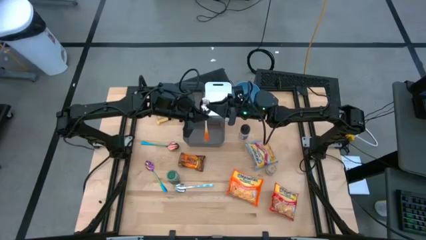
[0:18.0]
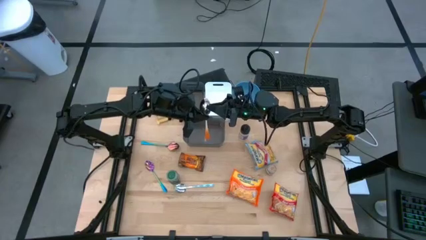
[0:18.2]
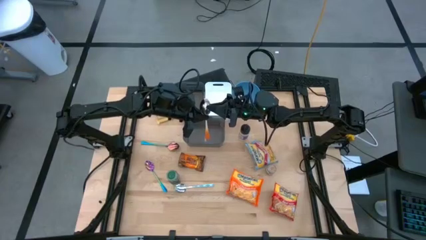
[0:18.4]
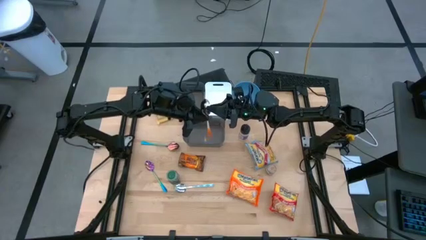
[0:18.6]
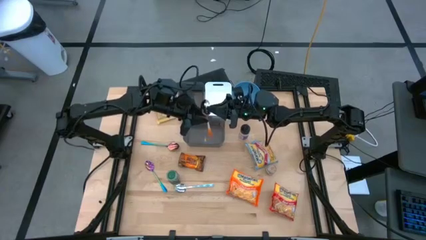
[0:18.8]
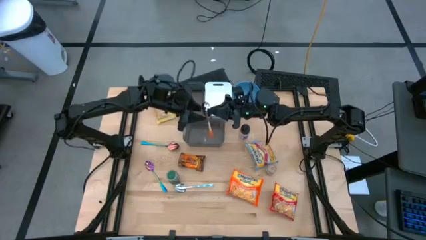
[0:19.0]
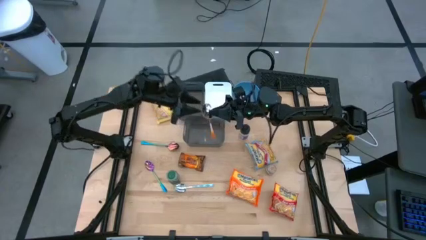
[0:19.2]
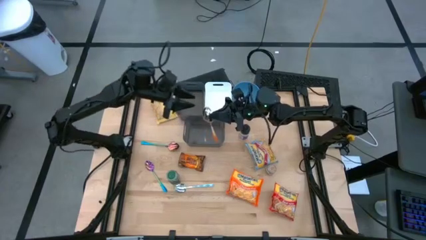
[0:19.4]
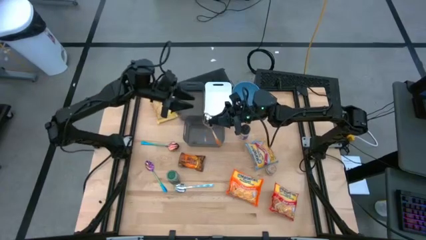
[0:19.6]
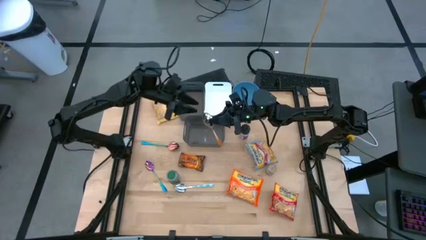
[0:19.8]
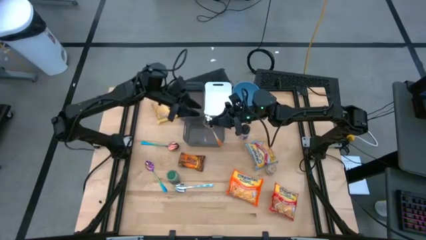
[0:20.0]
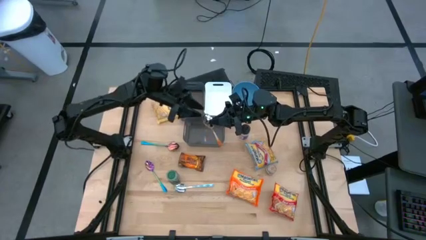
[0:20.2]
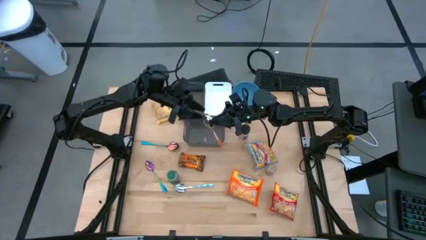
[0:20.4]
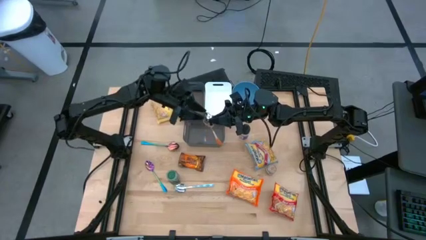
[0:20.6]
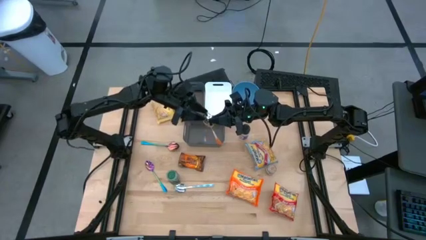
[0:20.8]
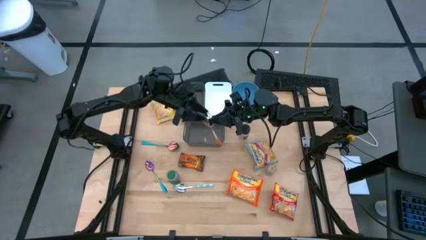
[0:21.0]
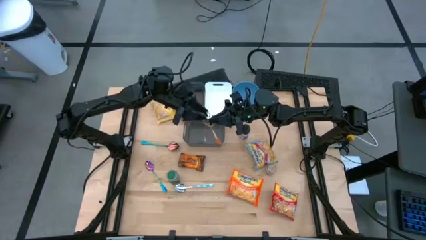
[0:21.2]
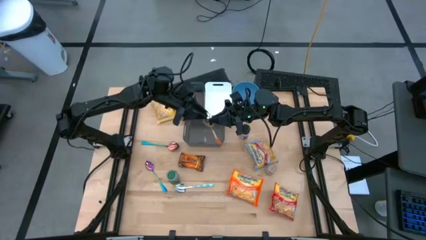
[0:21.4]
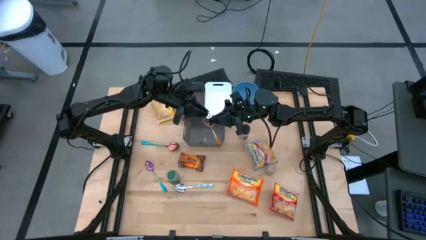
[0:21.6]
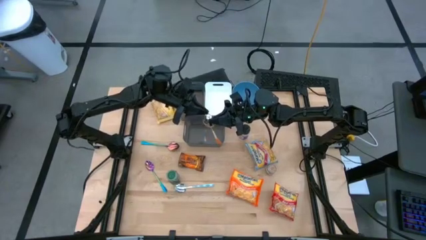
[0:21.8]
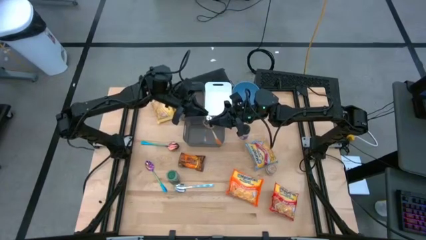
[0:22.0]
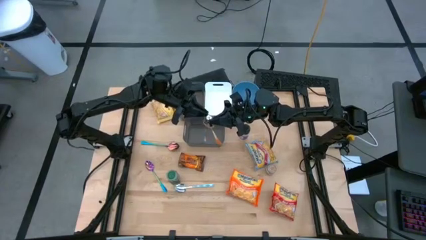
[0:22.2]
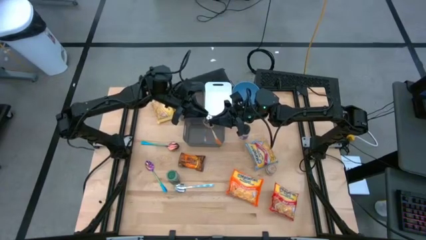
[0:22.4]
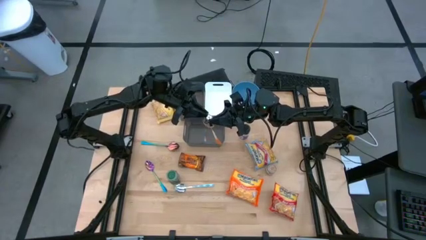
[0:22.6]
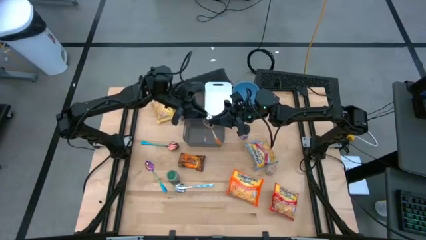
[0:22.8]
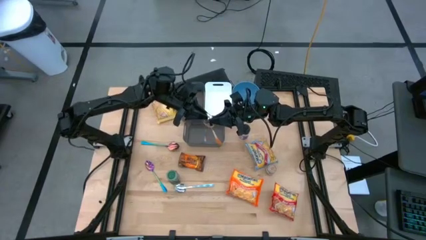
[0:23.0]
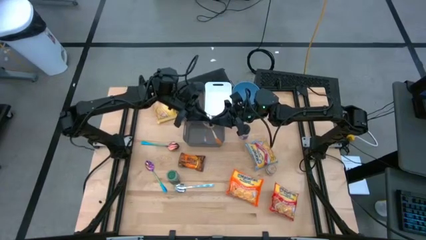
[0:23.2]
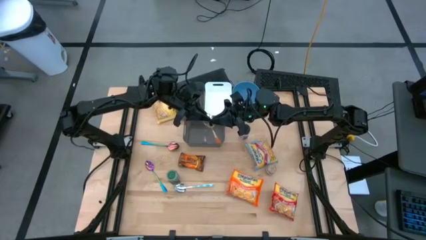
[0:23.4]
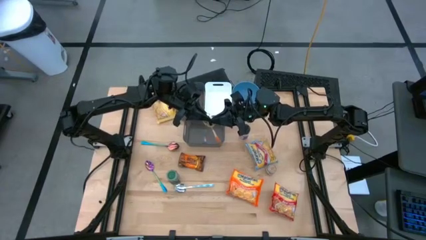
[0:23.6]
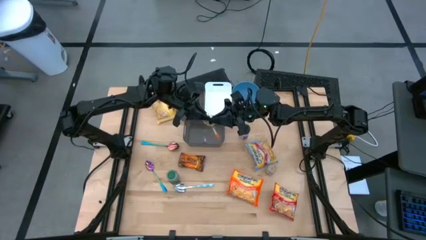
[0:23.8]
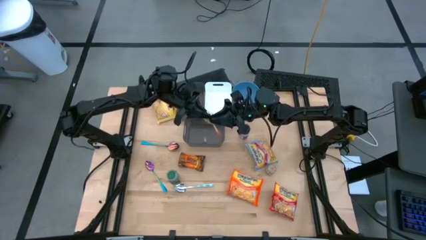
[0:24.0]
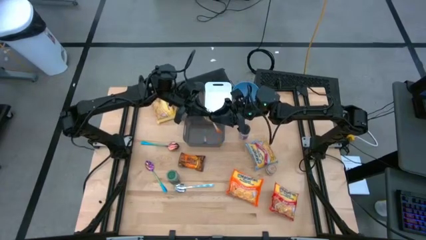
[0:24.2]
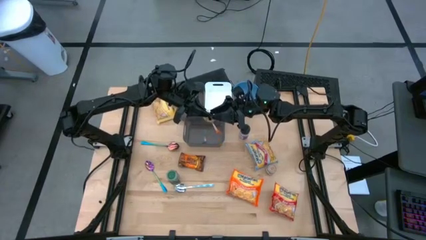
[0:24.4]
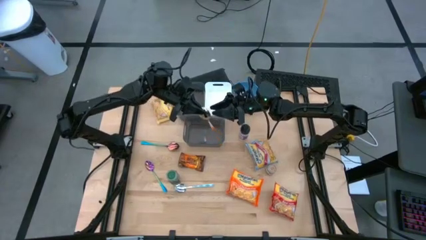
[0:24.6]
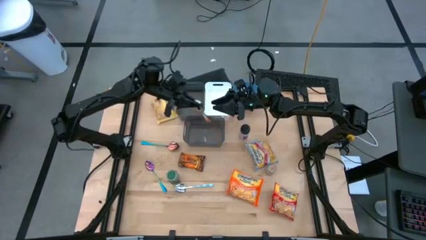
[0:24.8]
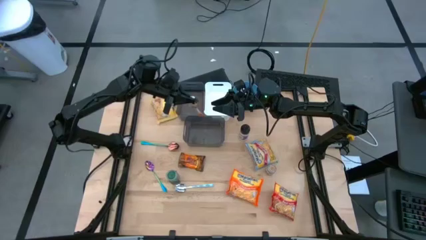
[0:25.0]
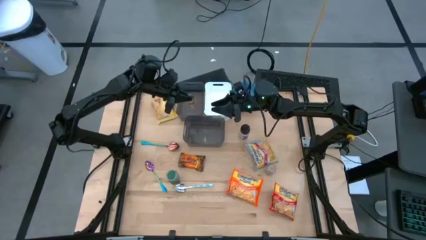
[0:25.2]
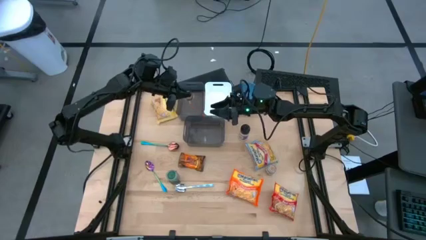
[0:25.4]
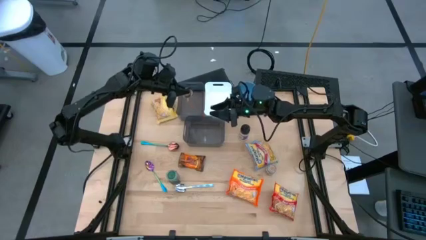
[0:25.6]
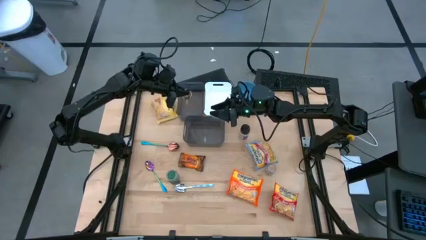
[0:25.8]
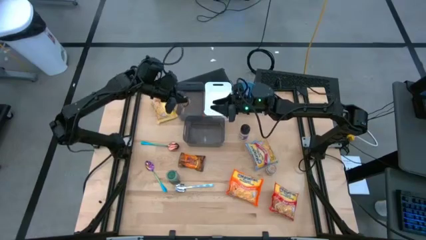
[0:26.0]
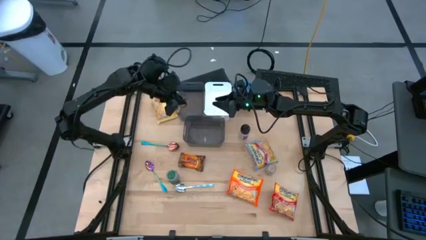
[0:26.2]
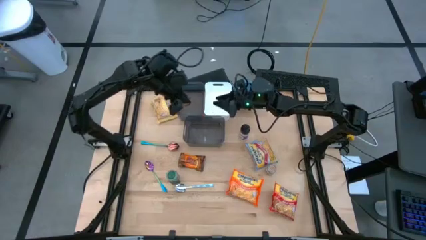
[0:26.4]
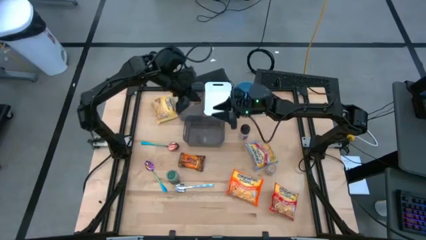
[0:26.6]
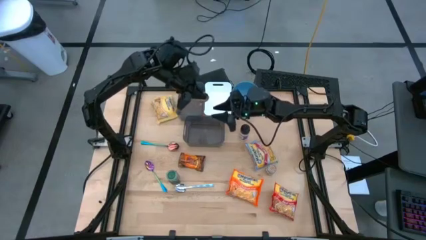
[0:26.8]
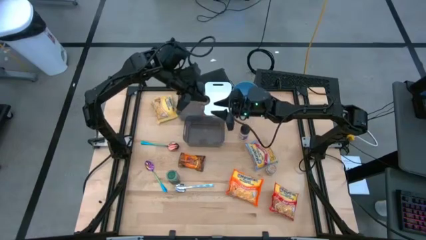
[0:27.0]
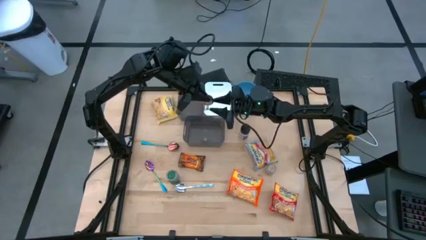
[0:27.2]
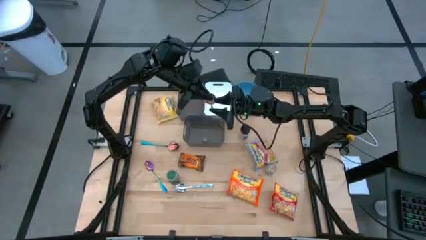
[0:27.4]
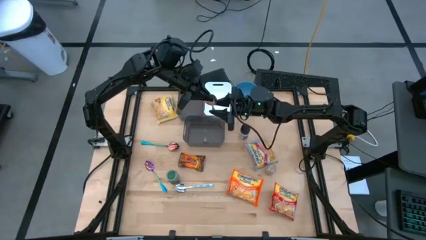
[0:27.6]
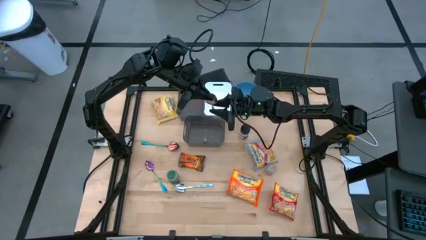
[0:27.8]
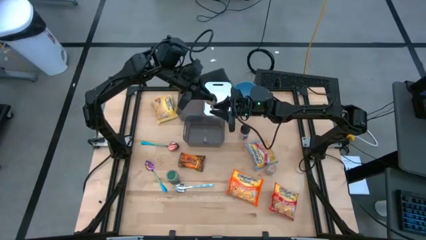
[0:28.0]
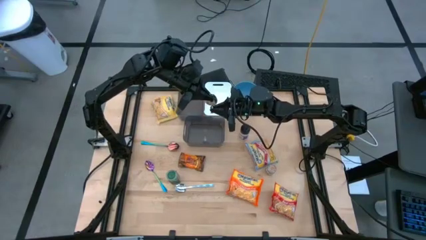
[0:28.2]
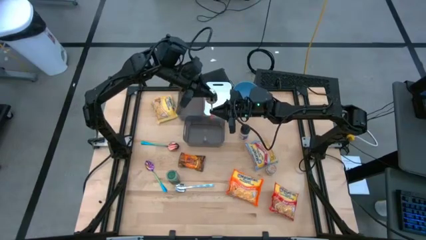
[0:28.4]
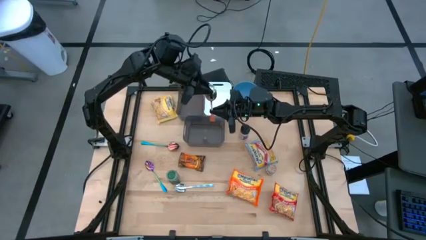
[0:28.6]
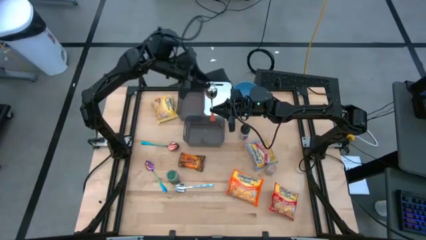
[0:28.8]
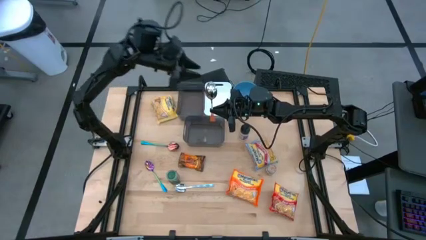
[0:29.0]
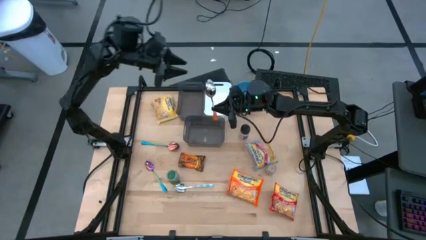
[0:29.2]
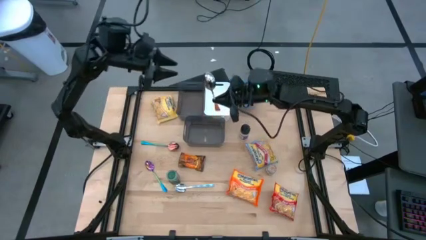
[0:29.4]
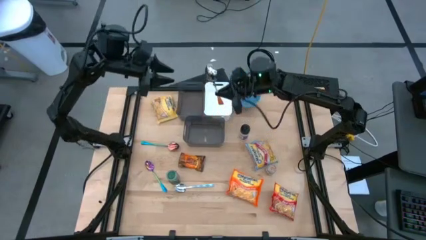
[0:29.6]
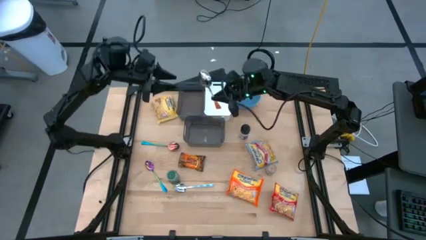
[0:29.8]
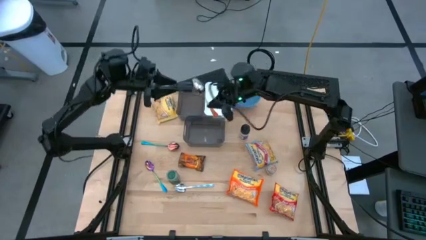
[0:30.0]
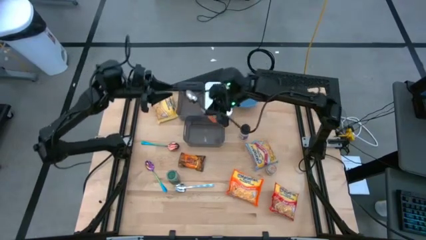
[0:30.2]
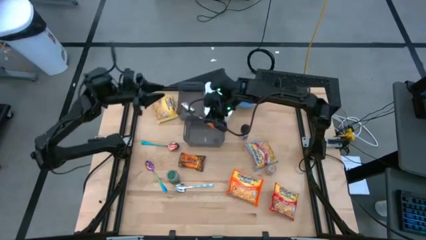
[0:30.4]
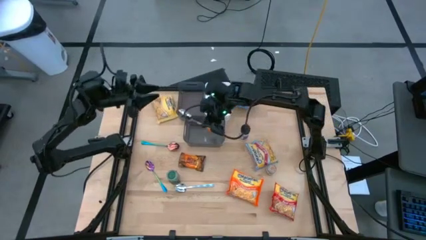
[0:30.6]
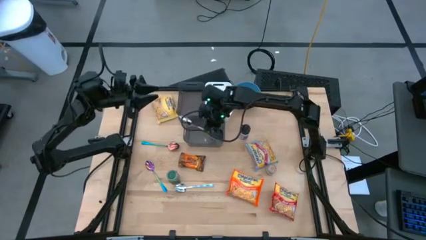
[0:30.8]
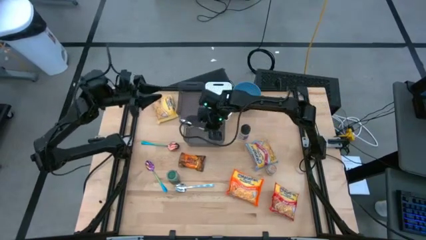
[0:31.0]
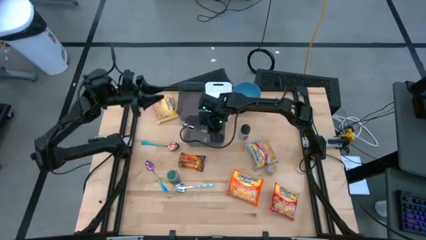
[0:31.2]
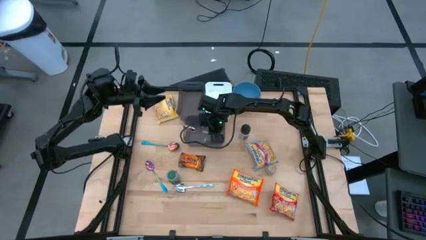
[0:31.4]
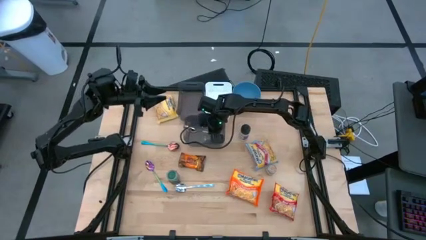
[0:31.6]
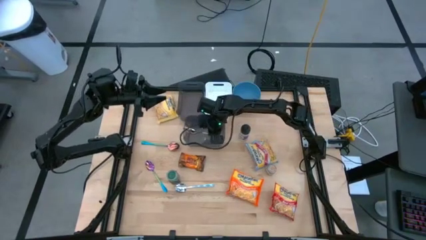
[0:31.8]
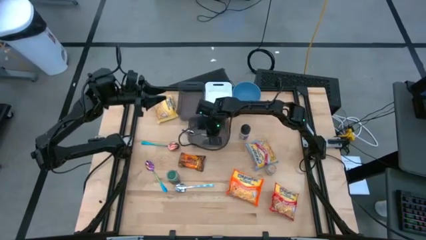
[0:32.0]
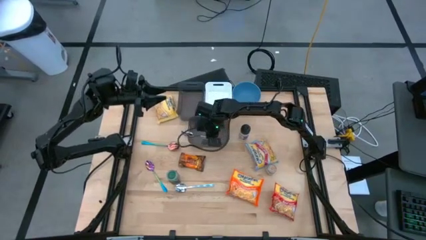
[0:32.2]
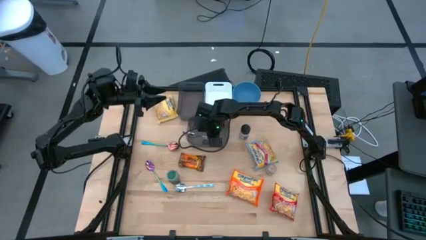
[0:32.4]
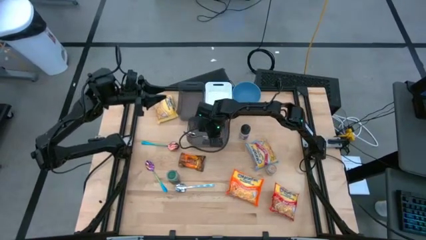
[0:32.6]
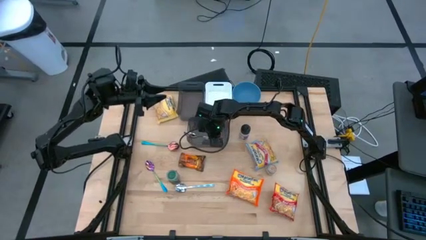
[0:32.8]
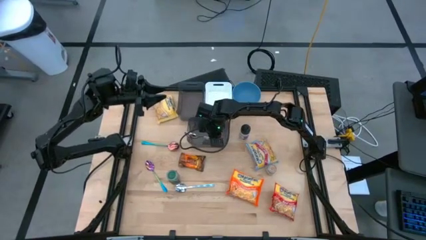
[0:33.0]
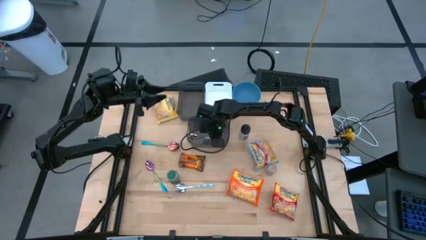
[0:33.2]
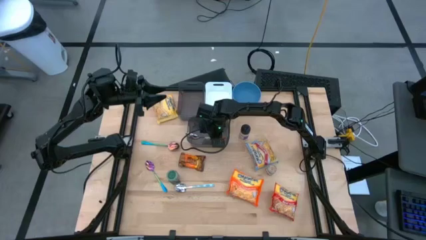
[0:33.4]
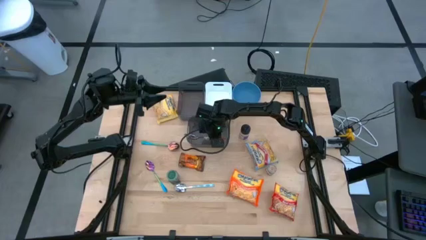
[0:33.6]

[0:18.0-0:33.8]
Task: Pick & Place Food Item
Put the orange spoon into the bottom black bin
